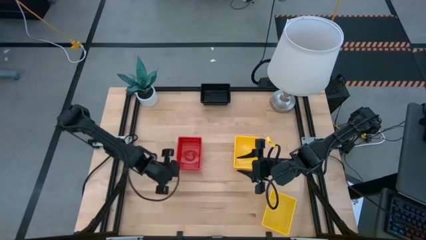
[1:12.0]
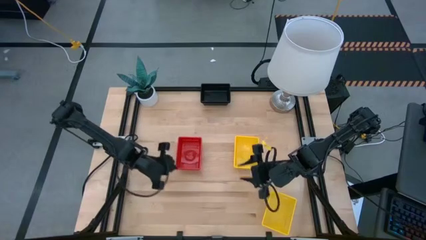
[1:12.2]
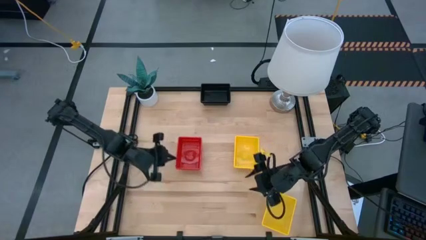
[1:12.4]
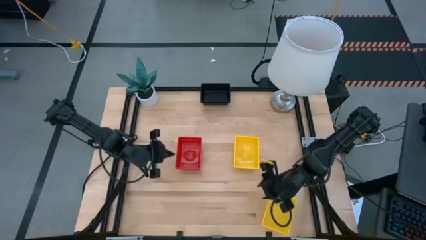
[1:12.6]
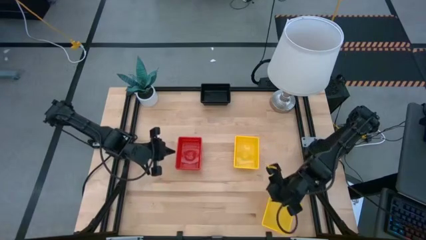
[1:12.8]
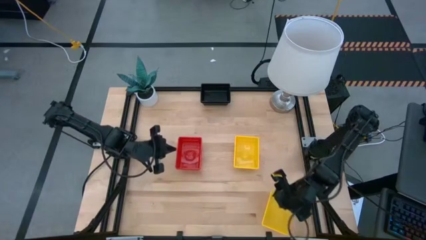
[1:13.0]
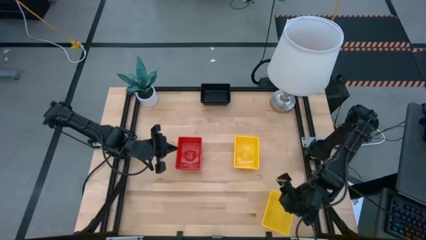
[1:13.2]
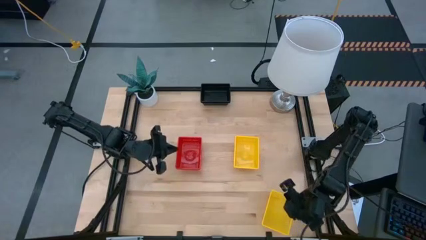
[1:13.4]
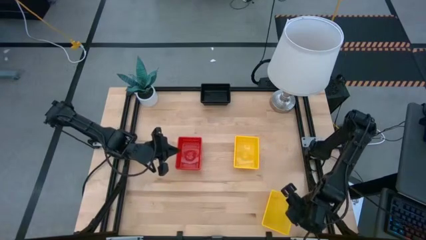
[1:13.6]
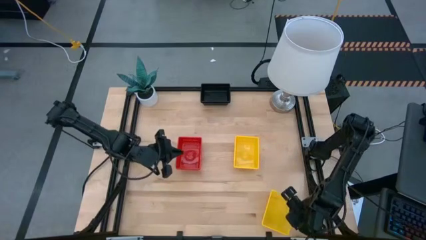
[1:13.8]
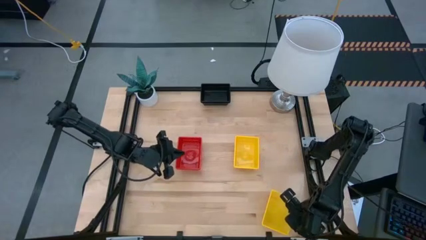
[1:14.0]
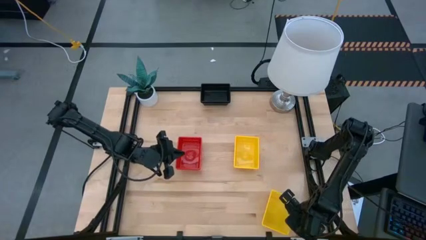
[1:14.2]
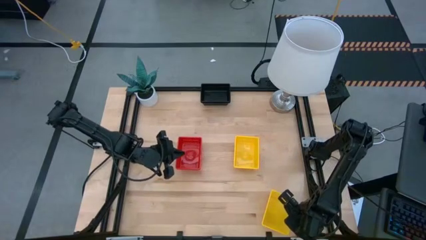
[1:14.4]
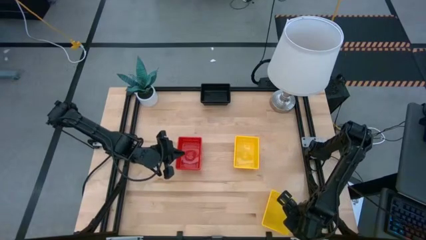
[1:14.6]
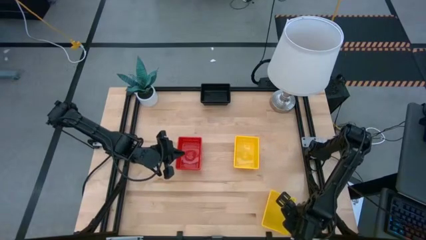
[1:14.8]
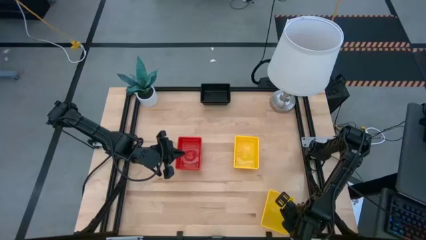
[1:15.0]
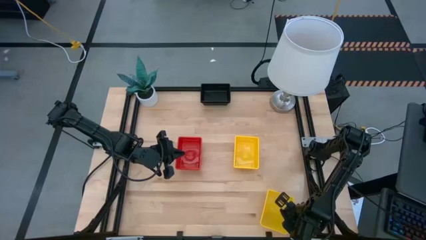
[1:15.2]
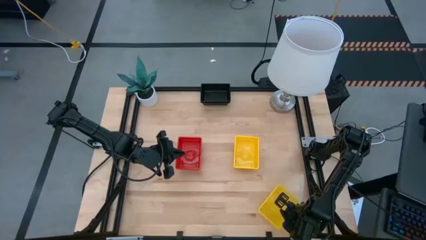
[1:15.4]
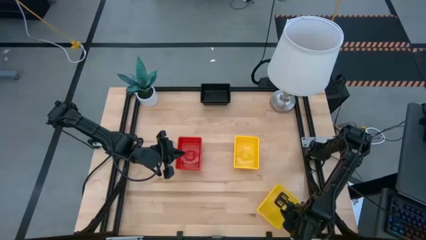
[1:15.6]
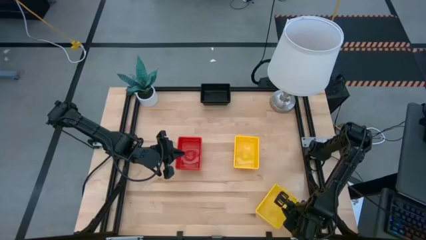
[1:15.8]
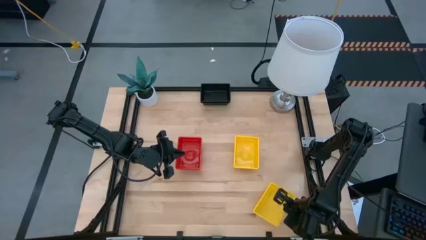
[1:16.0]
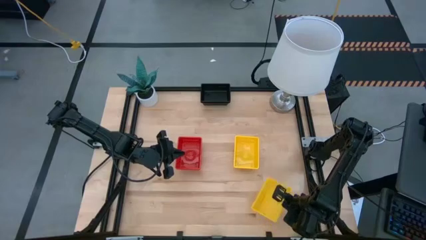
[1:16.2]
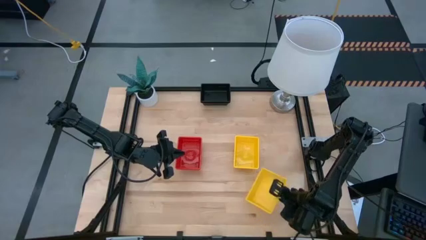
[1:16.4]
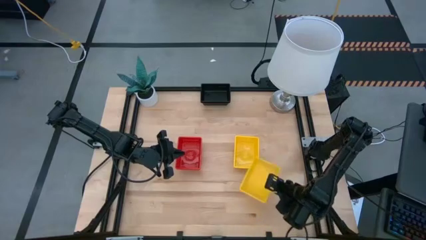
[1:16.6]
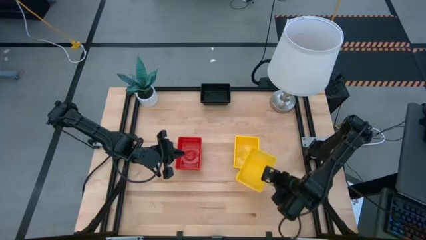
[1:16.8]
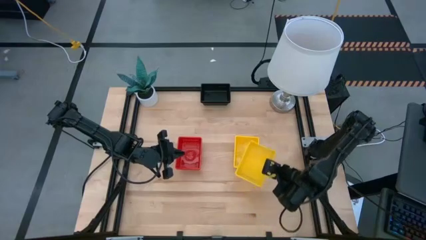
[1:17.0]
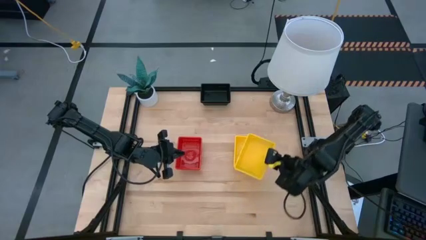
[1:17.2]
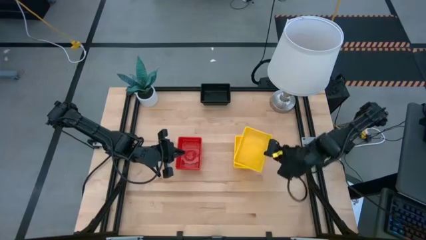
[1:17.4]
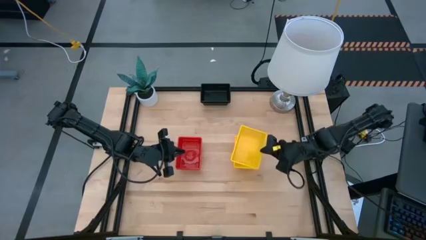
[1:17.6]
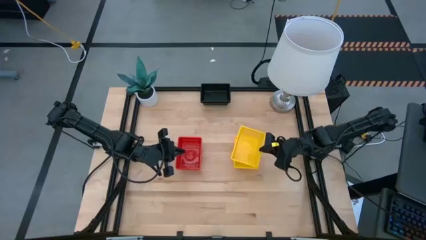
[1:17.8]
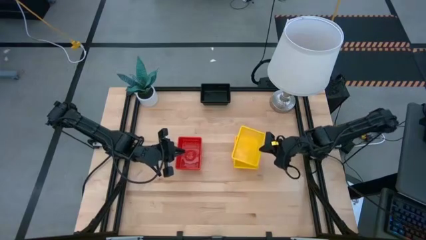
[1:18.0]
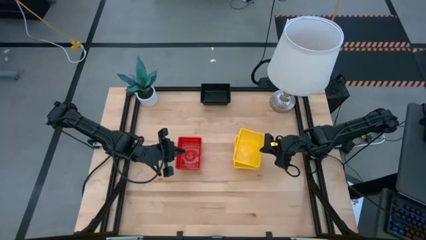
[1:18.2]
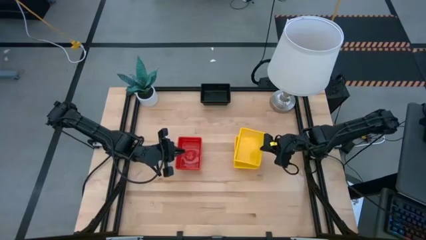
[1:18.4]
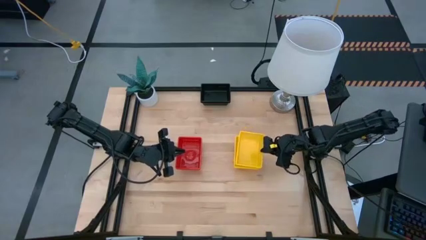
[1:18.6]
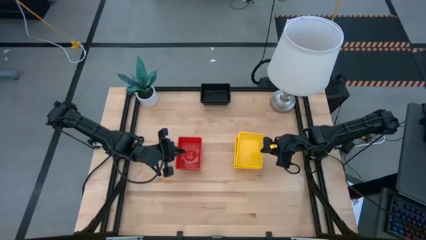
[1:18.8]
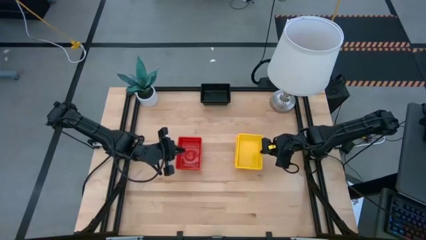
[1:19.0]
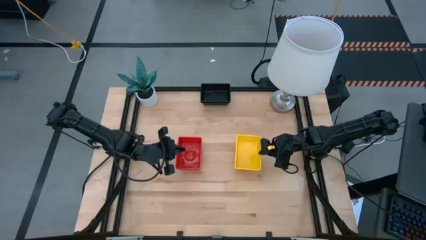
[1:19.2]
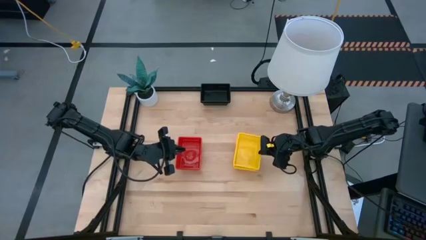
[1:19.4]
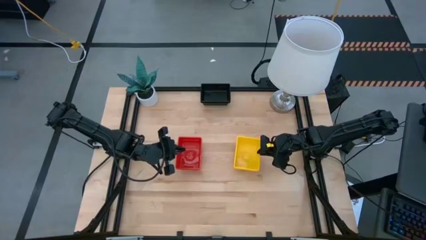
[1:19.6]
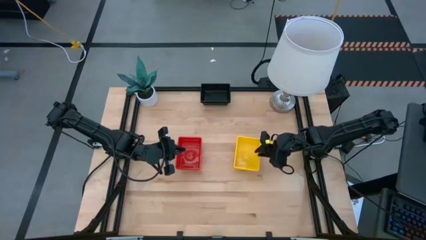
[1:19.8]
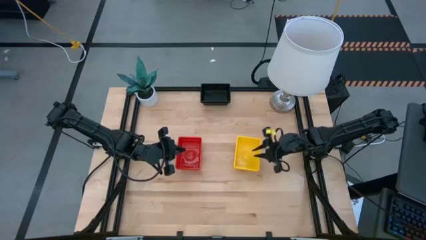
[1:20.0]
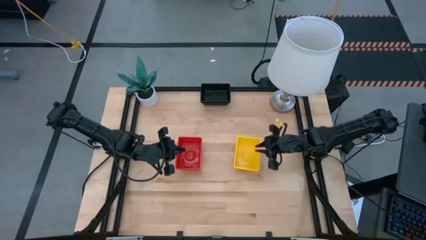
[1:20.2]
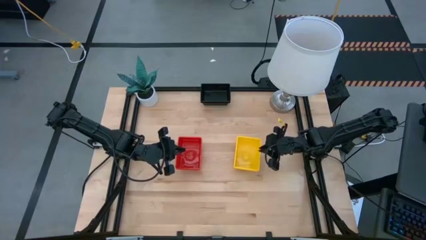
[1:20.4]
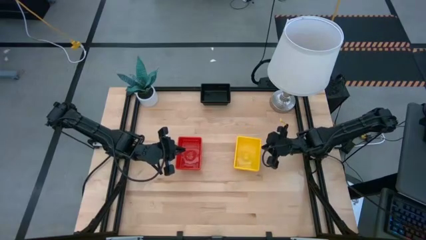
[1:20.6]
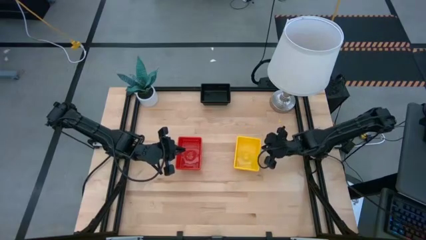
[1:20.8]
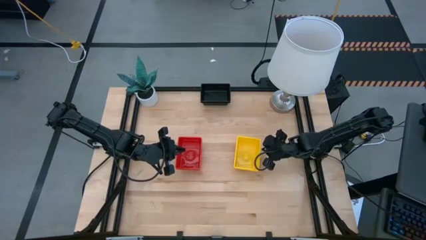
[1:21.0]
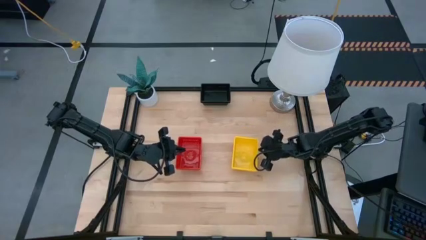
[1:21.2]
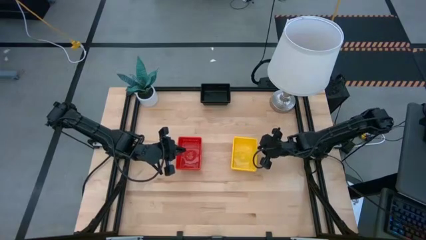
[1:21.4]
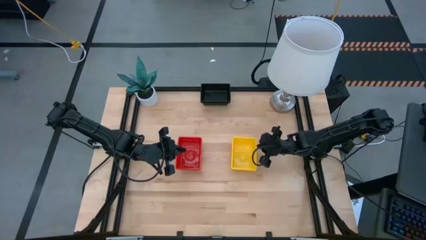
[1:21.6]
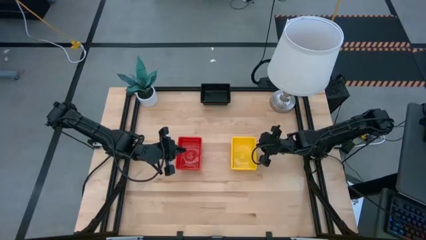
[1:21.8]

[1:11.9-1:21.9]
Stack the bottom yellow basket on the stacked top yellow baskets

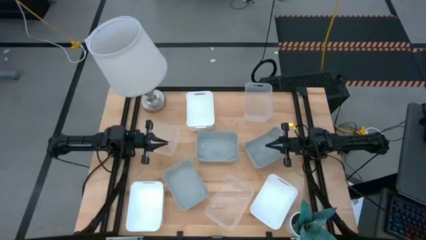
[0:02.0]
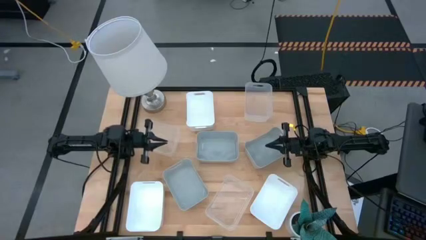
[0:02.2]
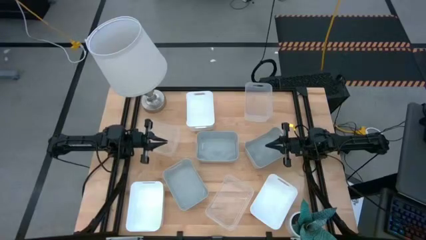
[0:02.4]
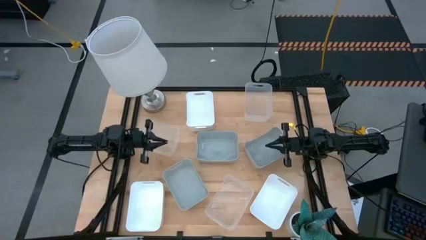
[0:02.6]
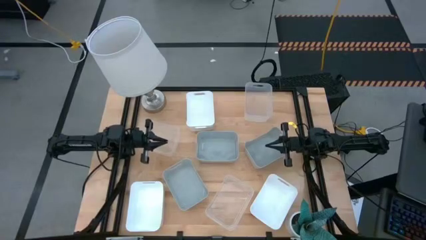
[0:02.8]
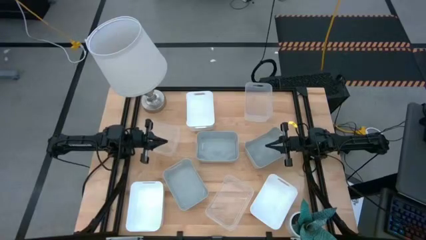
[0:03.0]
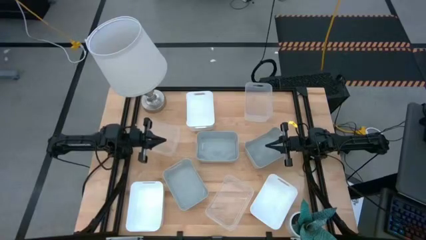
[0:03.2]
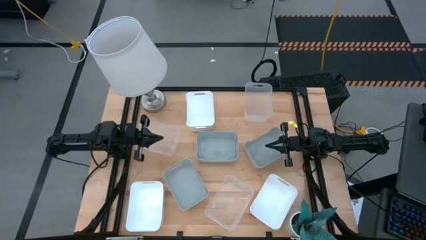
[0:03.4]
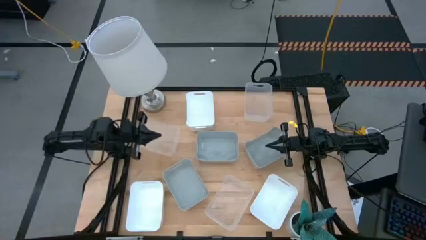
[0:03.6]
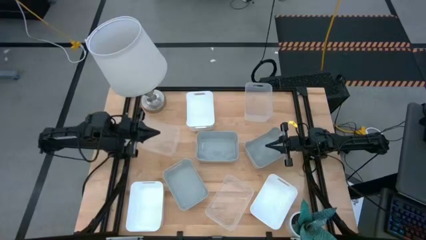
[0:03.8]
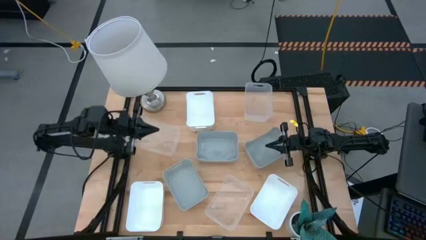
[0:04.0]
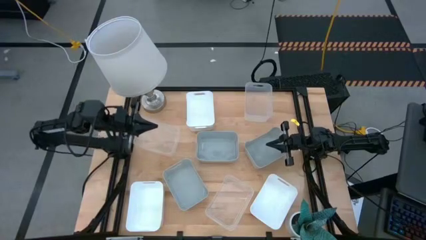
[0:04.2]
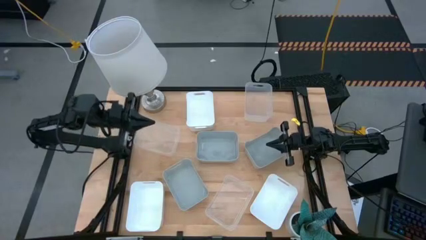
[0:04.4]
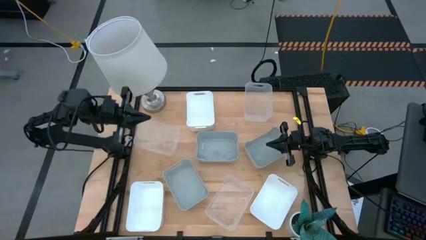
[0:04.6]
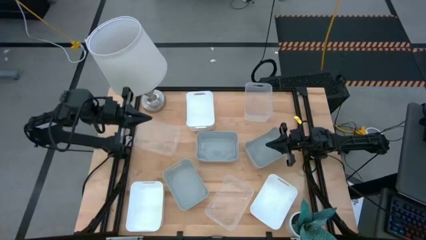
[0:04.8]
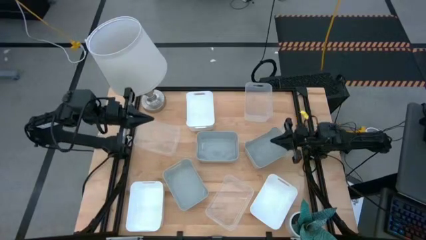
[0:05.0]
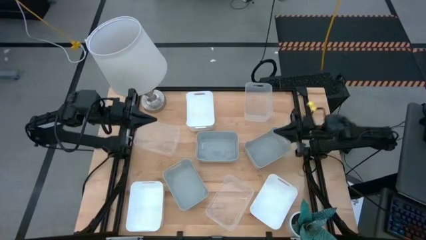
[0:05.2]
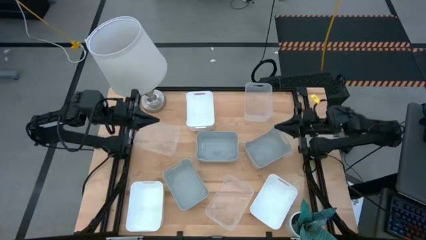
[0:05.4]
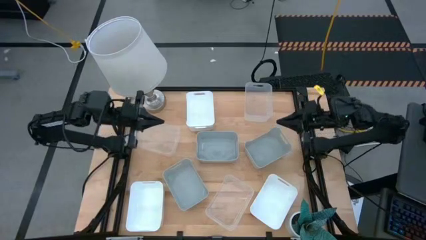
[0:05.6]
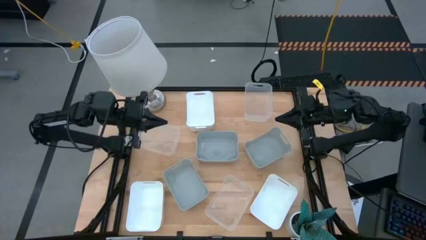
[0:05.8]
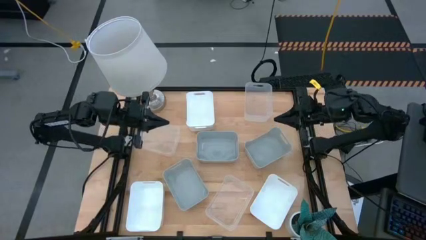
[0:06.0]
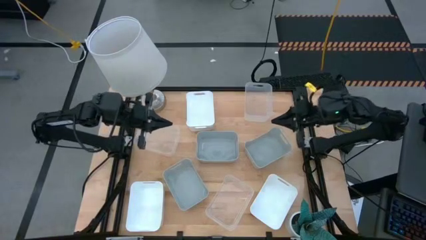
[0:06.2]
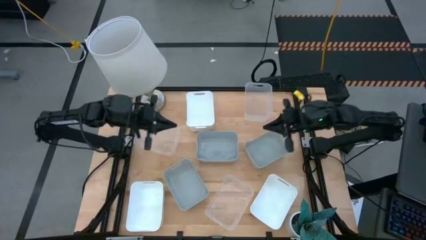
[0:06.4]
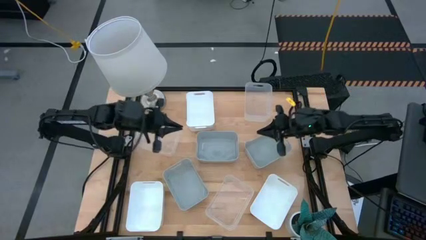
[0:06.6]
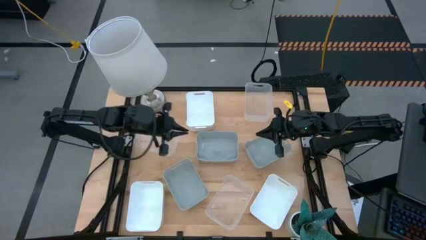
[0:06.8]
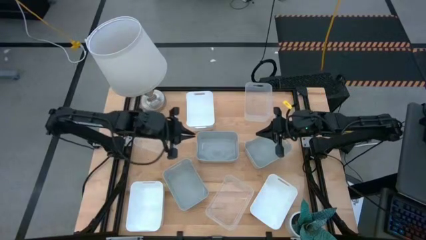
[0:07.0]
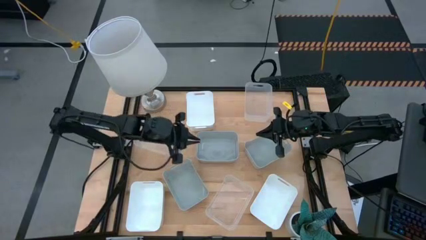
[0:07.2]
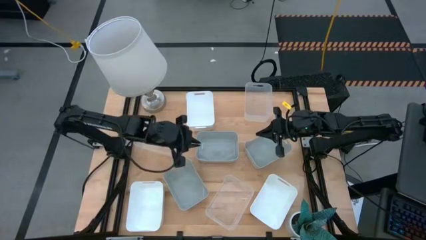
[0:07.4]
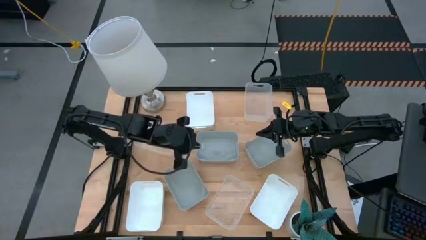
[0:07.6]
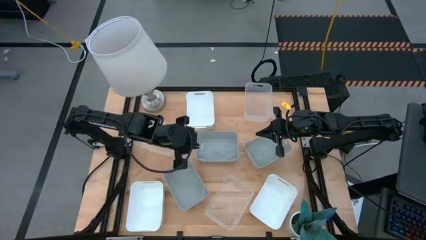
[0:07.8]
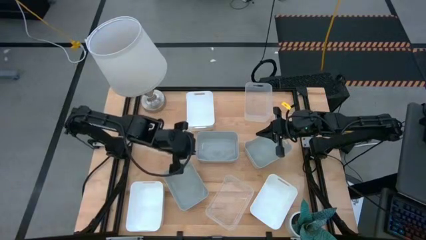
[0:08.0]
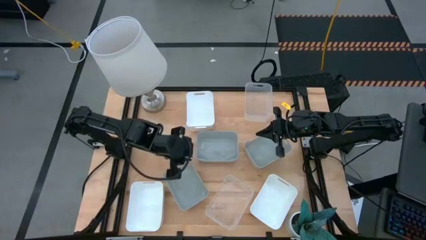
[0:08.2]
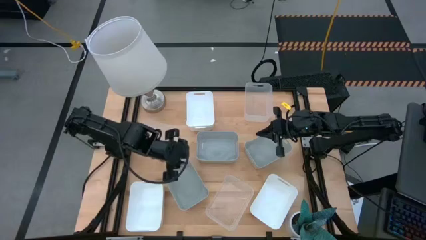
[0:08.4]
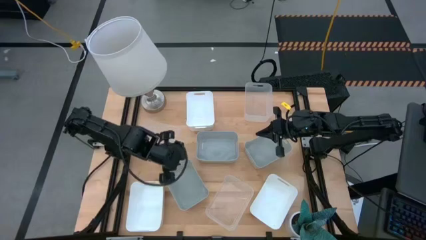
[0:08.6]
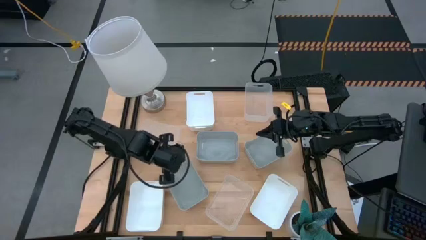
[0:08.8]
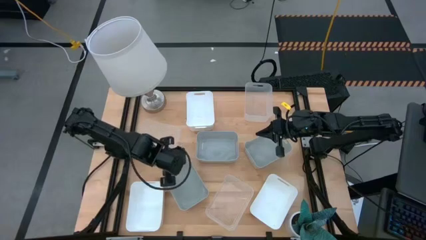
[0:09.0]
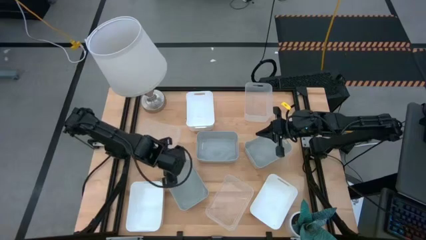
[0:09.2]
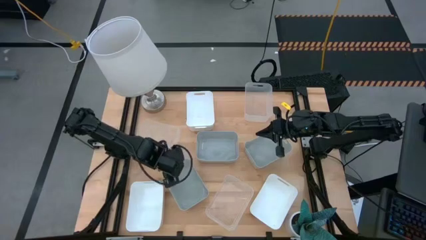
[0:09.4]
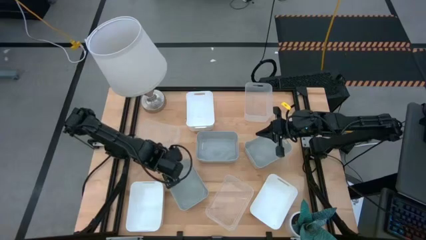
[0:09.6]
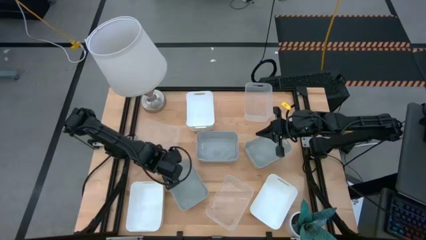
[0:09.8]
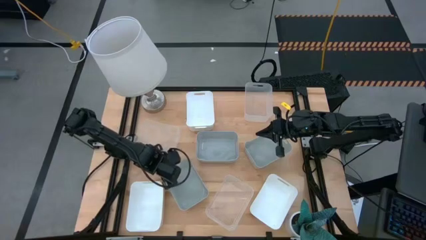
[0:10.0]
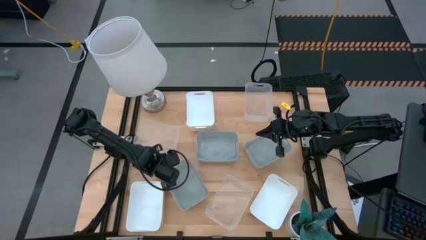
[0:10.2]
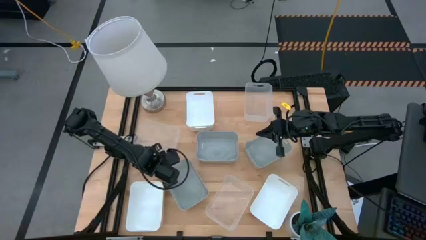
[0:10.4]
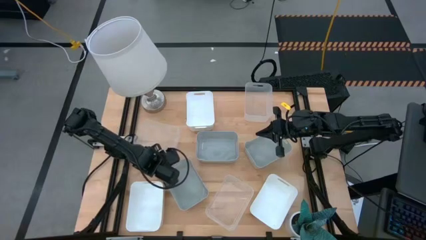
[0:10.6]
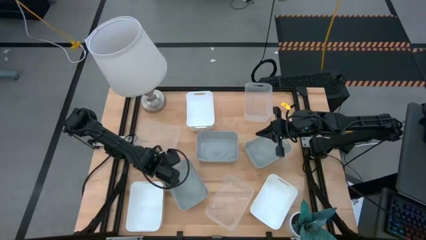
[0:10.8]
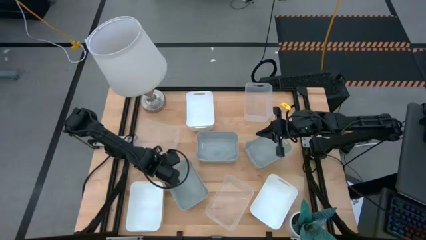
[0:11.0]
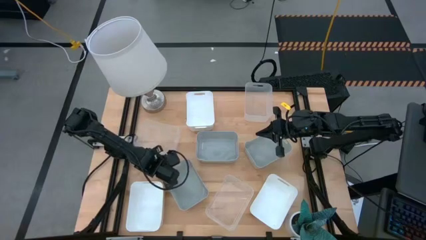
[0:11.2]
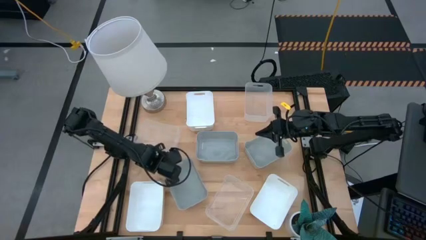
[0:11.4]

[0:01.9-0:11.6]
Stack the bottom gray bin on the middle gray bin
